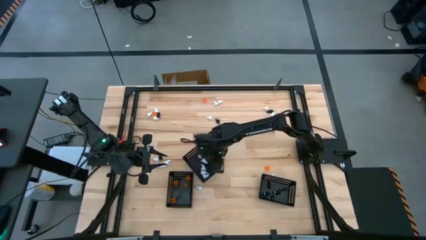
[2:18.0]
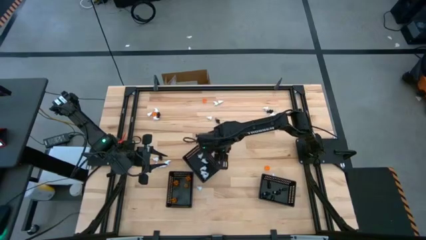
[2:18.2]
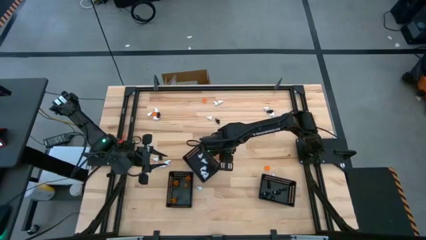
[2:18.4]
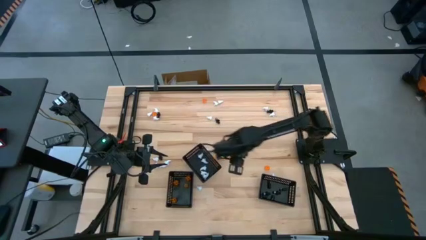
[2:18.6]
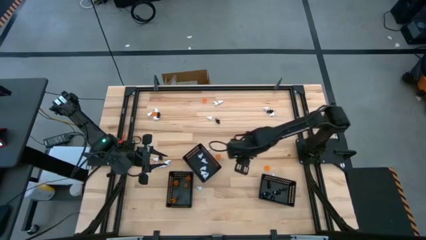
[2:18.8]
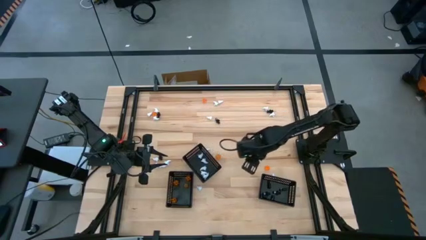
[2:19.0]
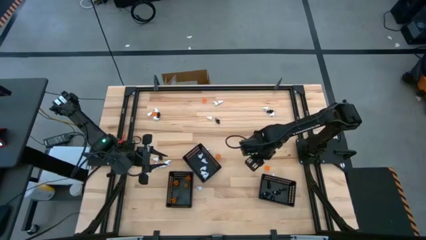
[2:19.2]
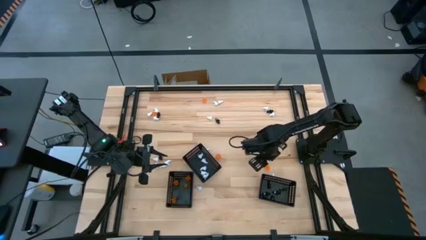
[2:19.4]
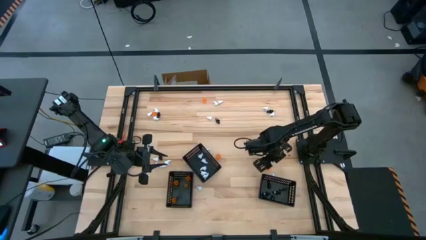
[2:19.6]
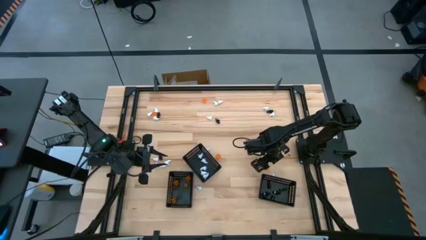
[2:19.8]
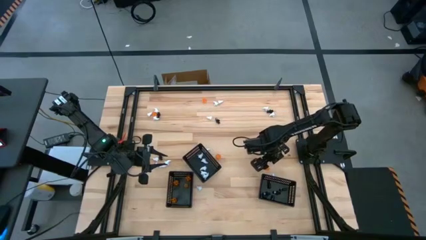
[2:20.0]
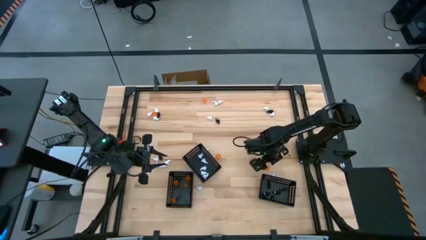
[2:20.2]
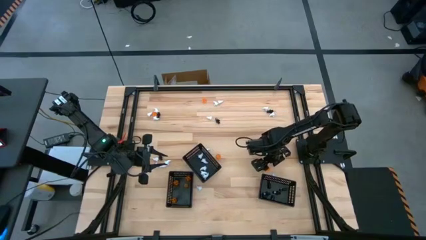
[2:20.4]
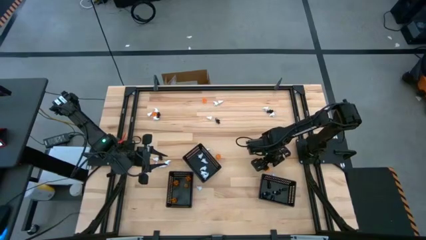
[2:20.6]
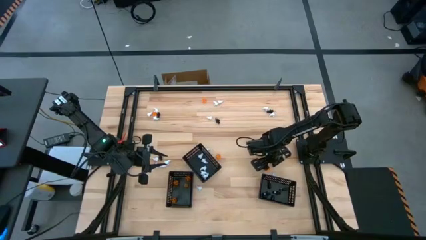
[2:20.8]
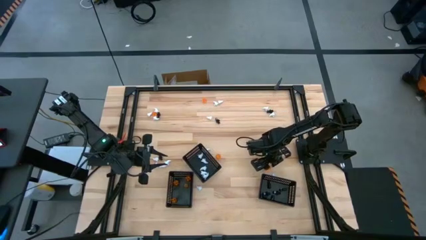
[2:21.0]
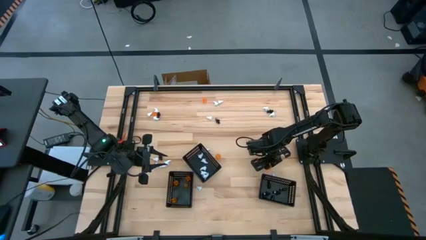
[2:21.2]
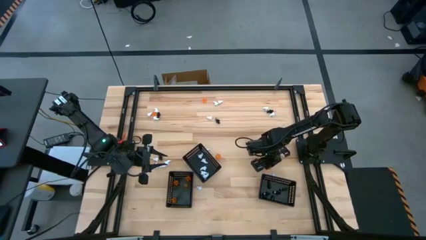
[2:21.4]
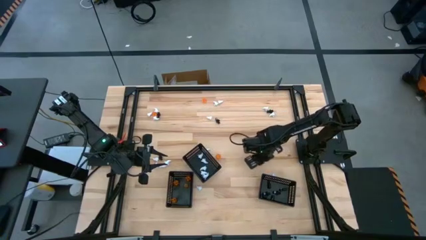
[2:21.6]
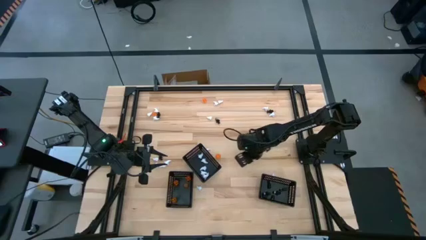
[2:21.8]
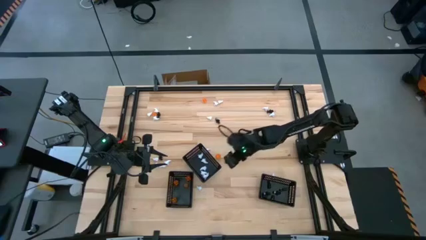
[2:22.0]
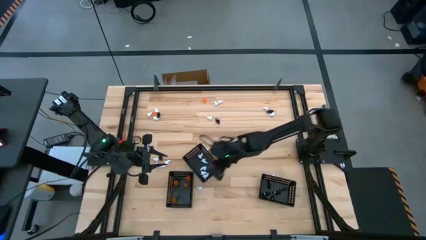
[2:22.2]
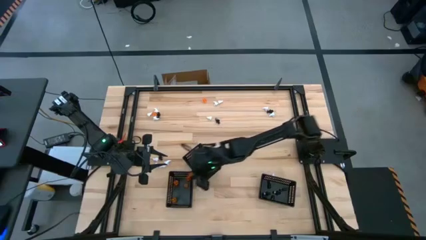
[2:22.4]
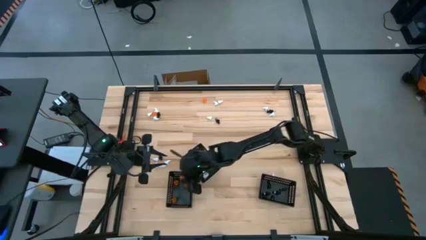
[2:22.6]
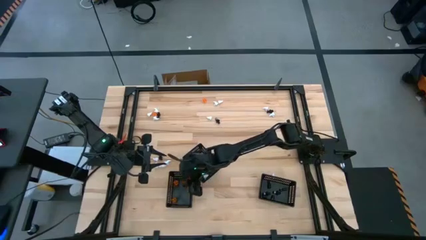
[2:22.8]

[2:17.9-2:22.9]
Task: Sort Halloween decoration
Put the orange pumpkin toy into the left black basket

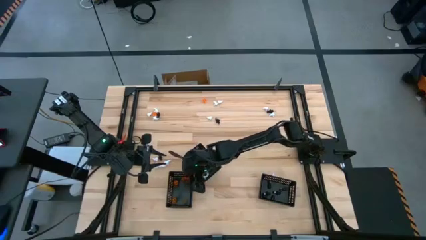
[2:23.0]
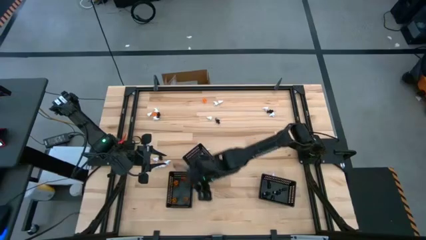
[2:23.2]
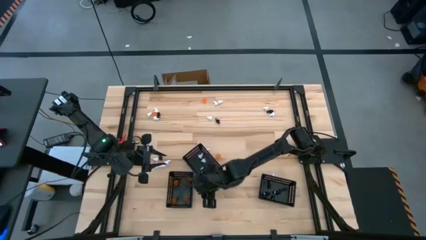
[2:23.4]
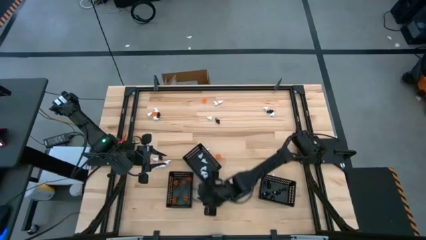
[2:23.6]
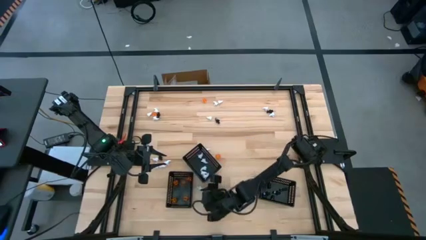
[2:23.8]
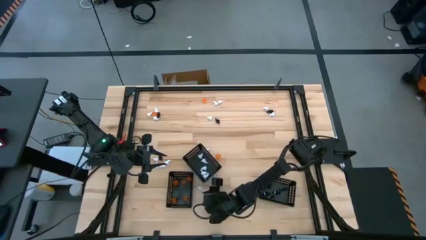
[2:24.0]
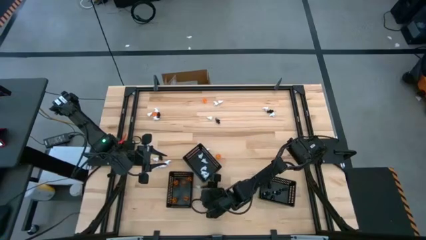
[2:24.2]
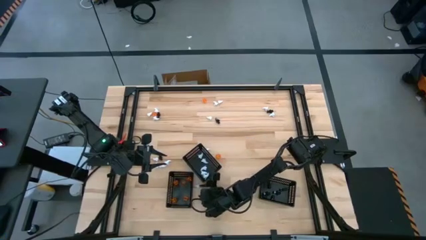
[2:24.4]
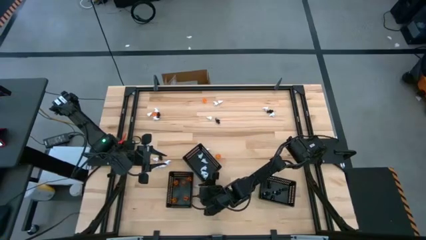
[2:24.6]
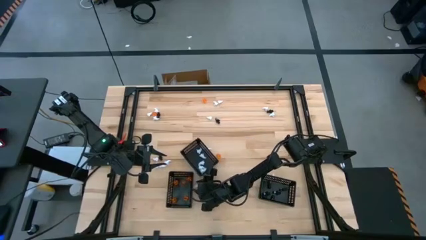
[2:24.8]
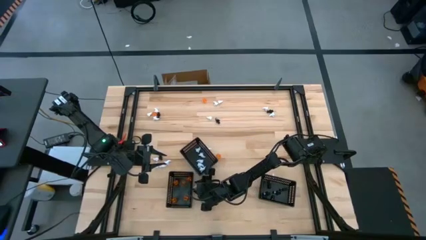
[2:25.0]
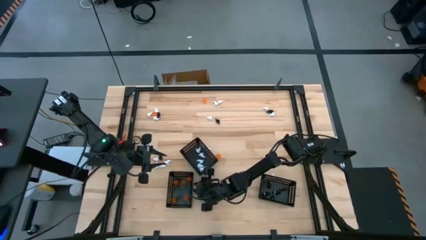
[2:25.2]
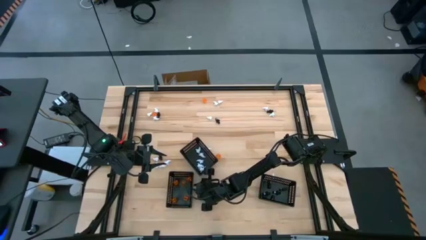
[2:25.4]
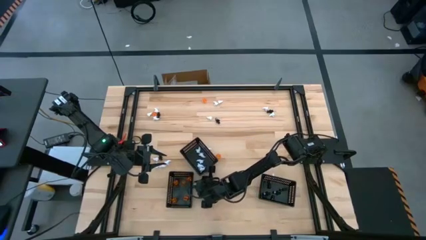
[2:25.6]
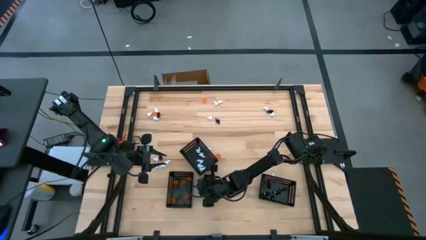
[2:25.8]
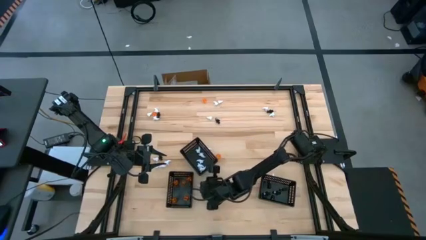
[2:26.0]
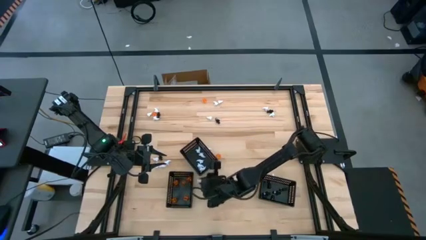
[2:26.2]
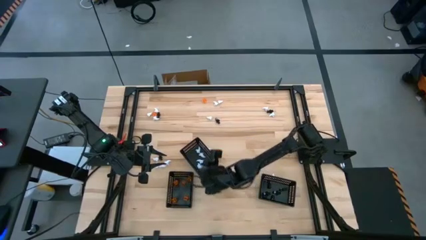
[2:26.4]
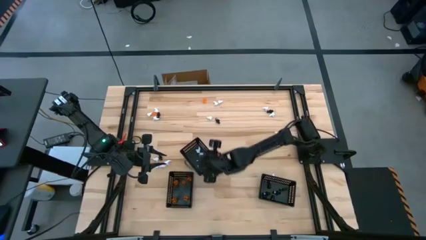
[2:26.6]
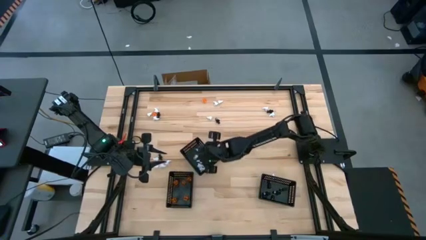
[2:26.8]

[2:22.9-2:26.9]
Put the white ghost toy into the middle black basket

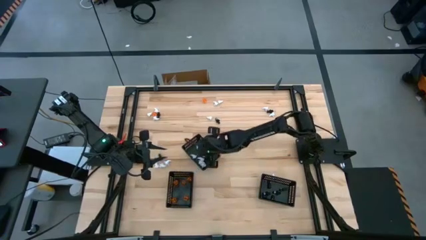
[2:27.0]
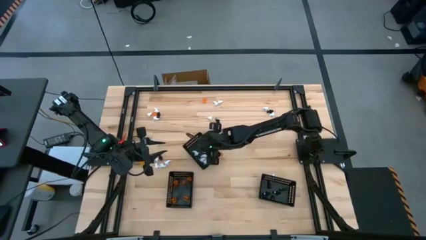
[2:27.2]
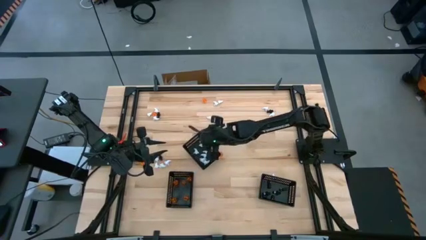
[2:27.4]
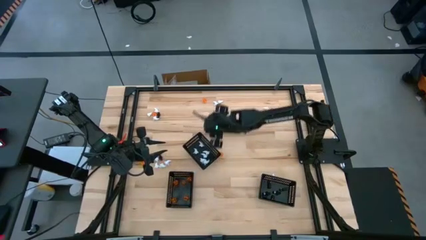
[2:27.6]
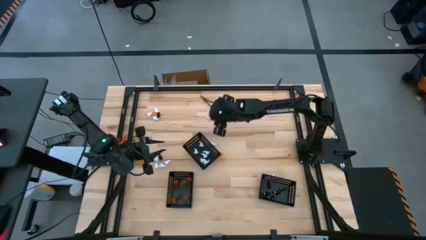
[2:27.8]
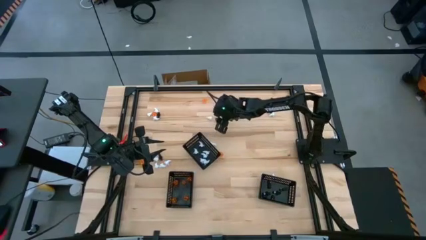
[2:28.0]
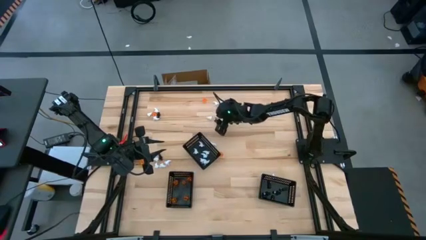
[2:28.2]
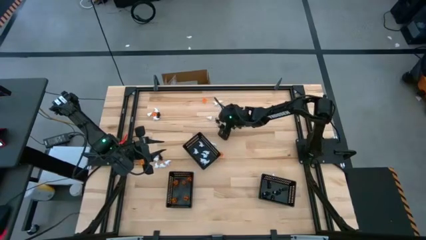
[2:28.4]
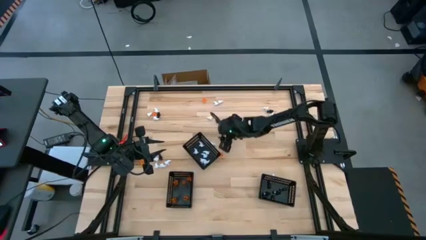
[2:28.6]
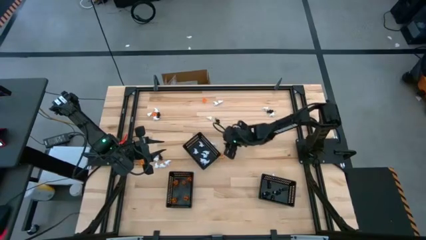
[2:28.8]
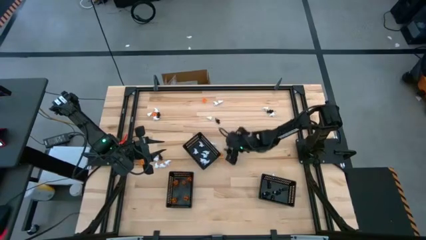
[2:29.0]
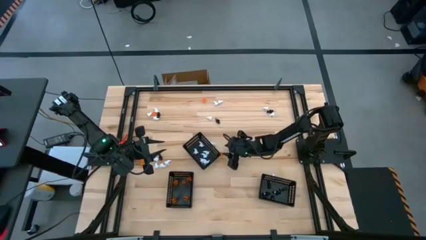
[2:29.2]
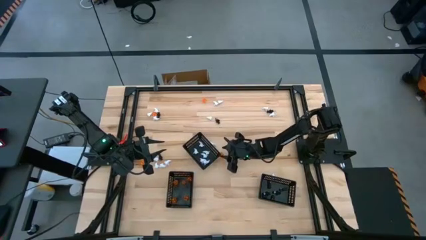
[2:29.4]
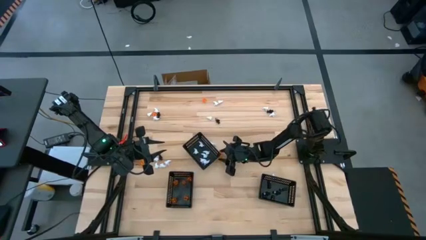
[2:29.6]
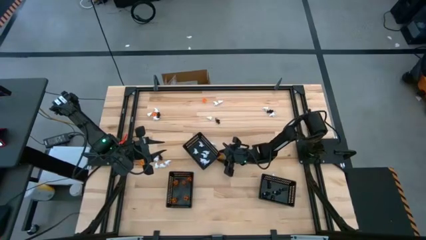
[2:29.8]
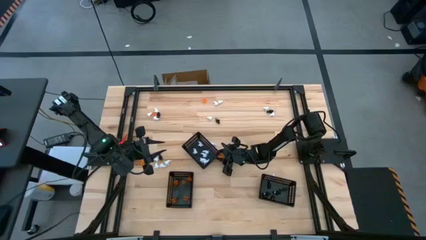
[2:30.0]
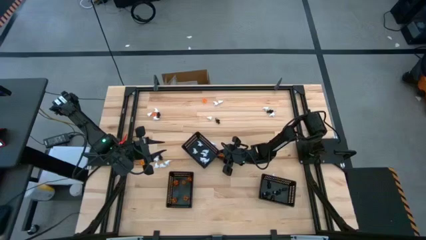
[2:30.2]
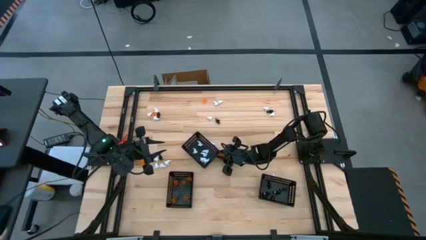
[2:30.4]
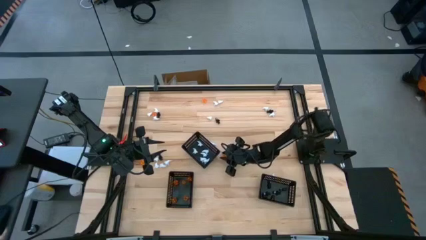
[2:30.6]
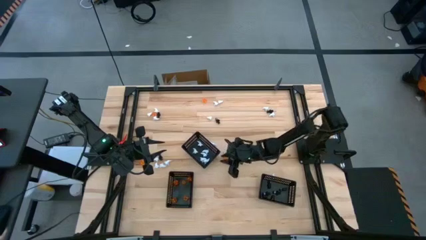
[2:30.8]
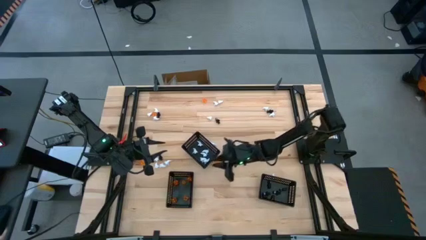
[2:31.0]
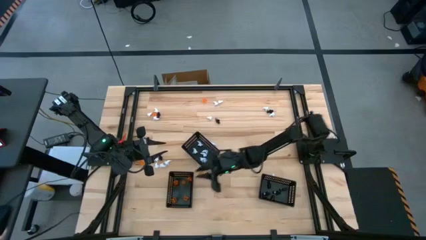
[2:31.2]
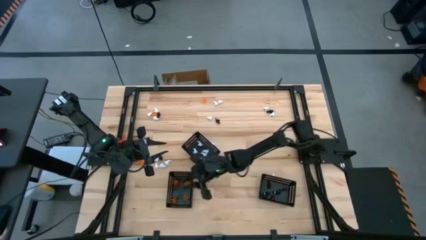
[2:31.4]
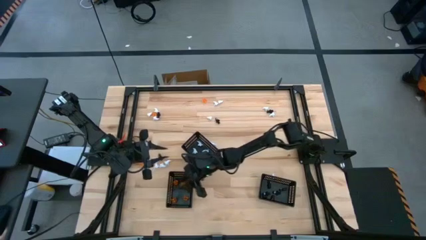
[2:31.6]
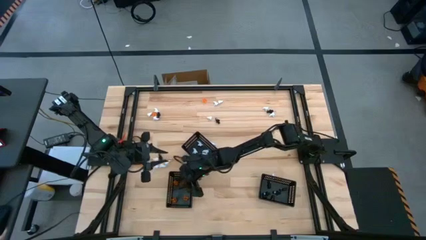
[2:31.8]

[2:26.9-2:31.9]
Put the orange pumpkin toy into the left black basket
